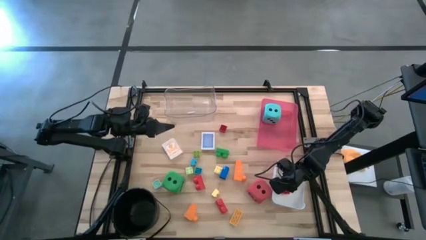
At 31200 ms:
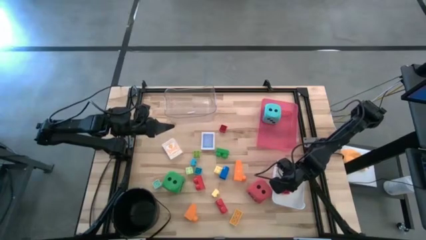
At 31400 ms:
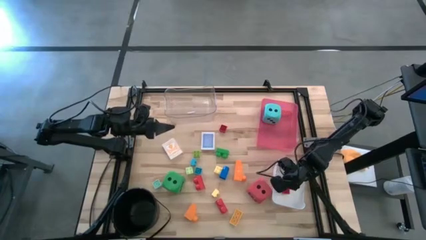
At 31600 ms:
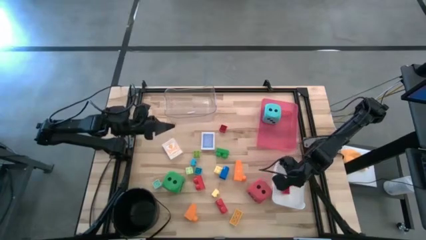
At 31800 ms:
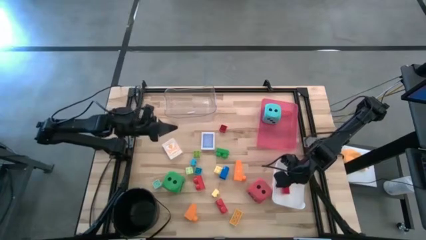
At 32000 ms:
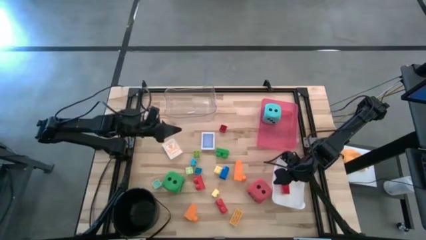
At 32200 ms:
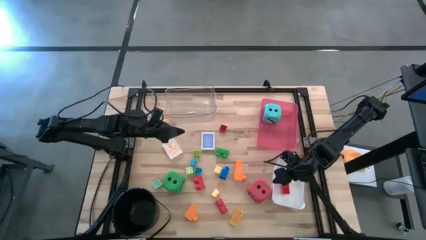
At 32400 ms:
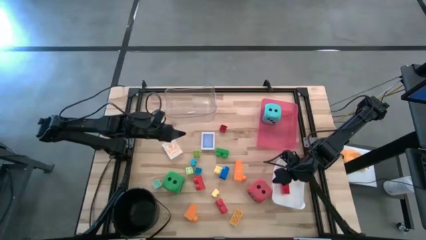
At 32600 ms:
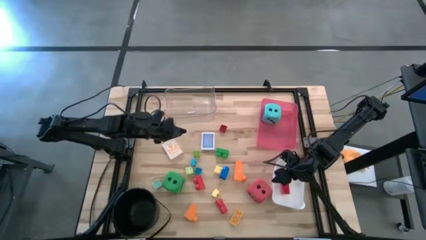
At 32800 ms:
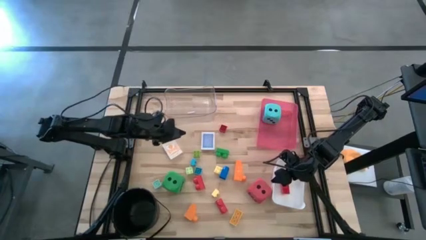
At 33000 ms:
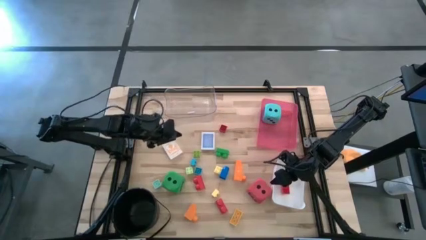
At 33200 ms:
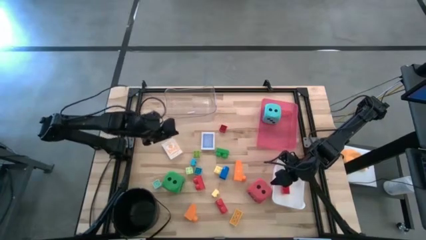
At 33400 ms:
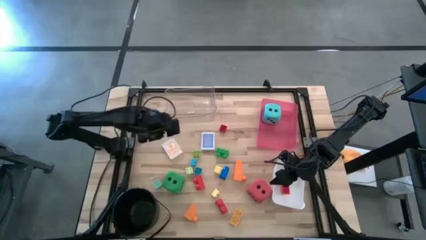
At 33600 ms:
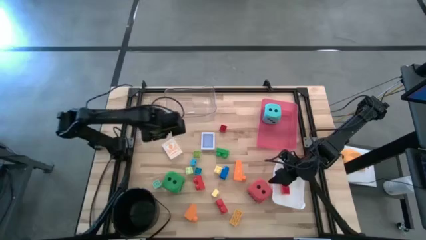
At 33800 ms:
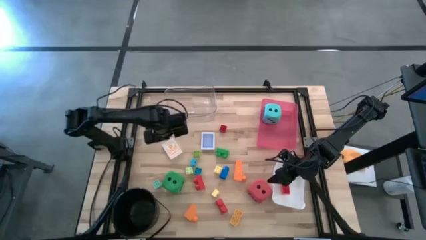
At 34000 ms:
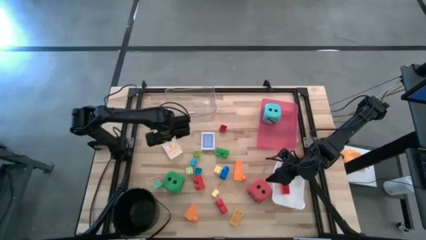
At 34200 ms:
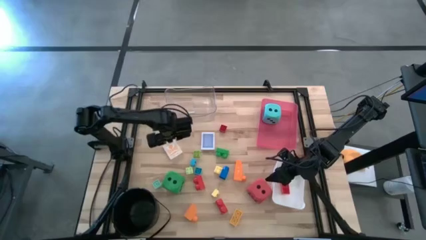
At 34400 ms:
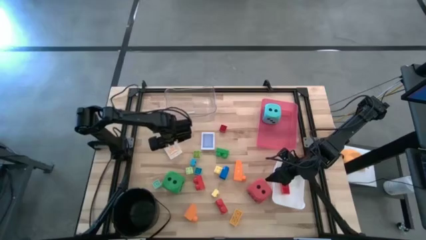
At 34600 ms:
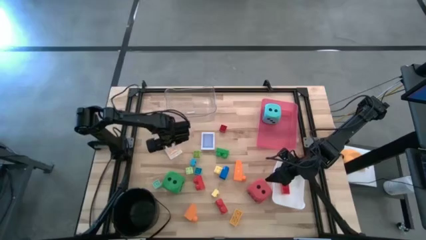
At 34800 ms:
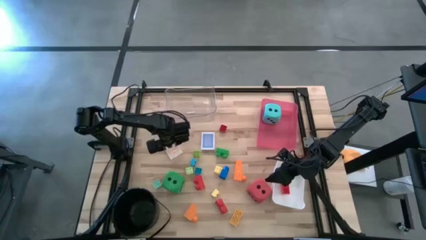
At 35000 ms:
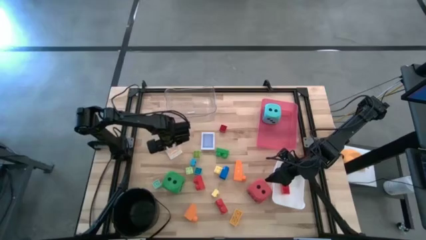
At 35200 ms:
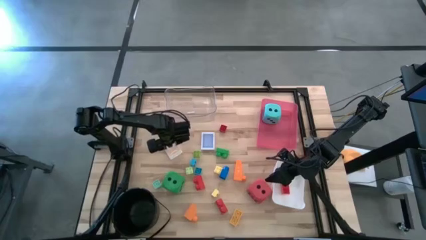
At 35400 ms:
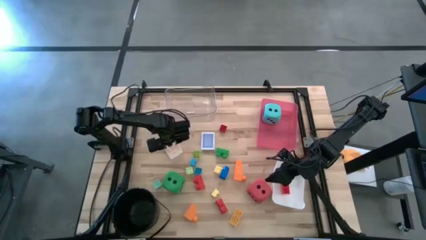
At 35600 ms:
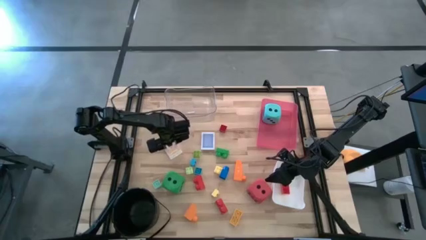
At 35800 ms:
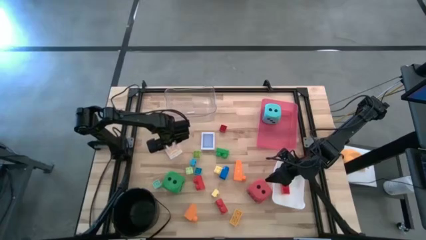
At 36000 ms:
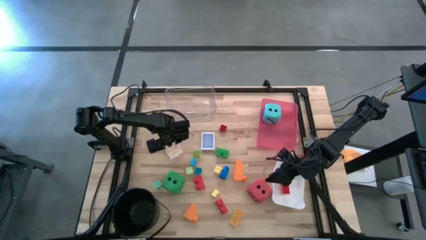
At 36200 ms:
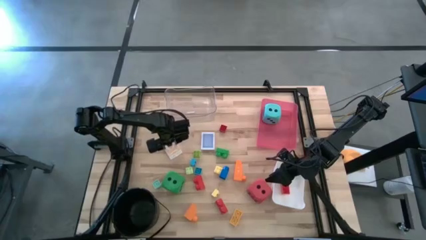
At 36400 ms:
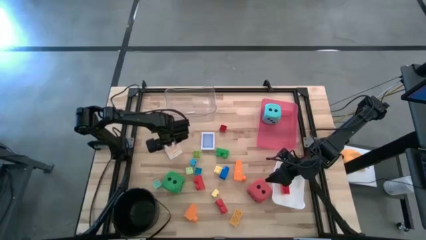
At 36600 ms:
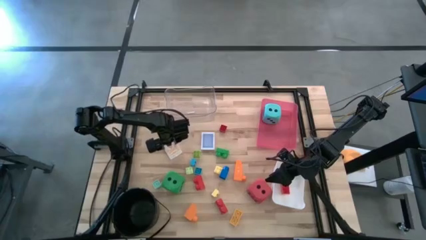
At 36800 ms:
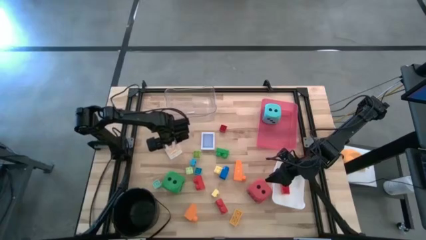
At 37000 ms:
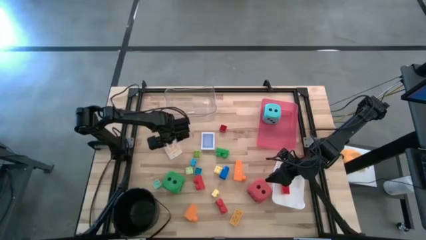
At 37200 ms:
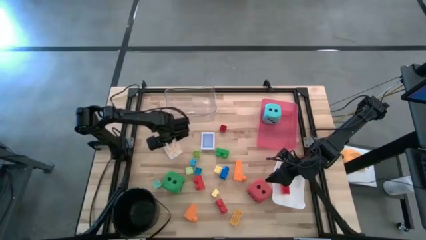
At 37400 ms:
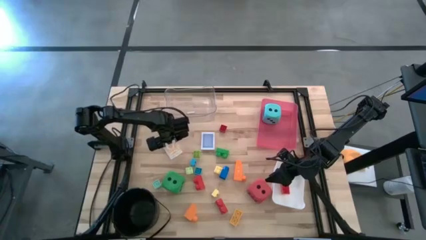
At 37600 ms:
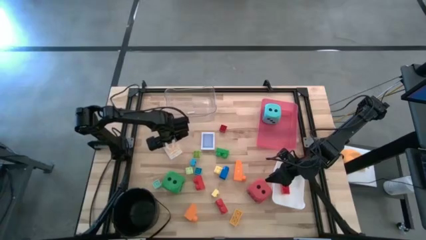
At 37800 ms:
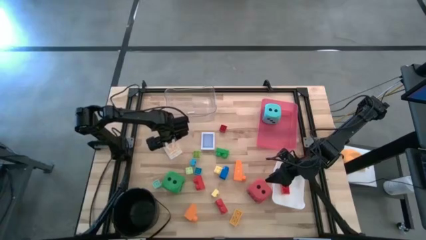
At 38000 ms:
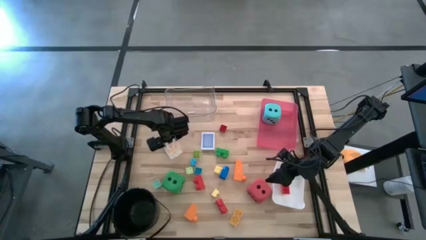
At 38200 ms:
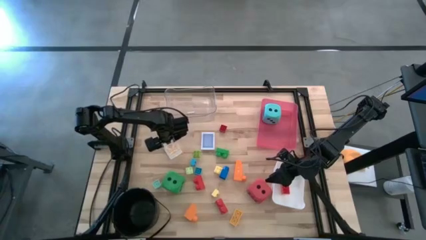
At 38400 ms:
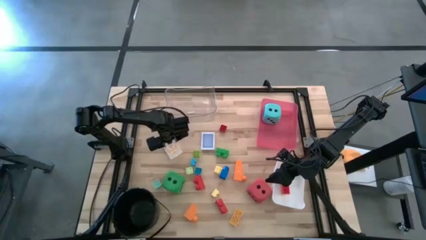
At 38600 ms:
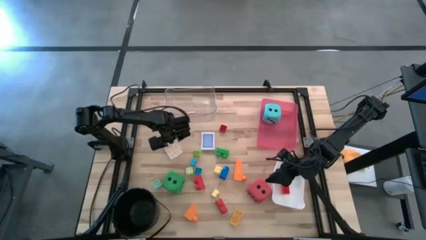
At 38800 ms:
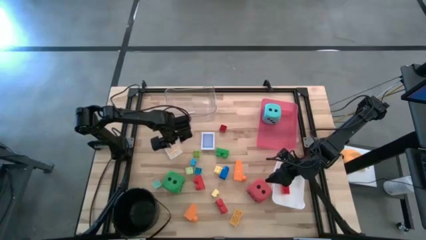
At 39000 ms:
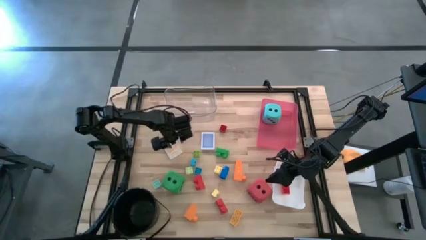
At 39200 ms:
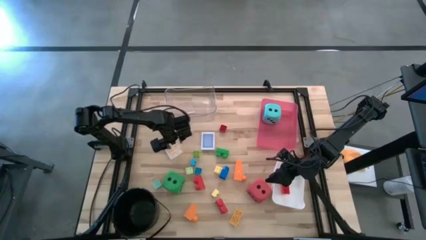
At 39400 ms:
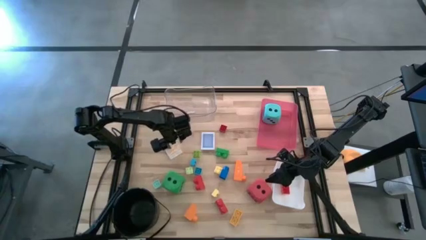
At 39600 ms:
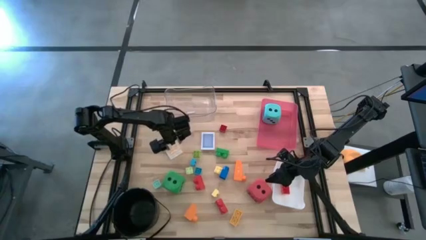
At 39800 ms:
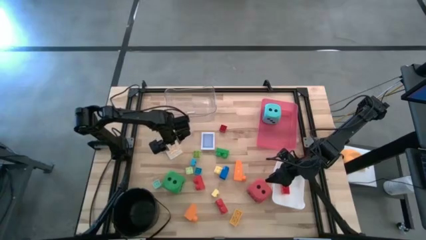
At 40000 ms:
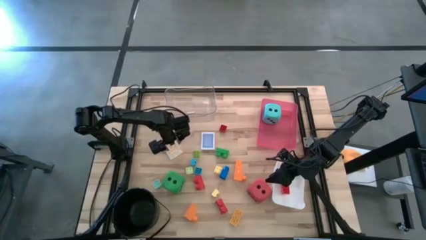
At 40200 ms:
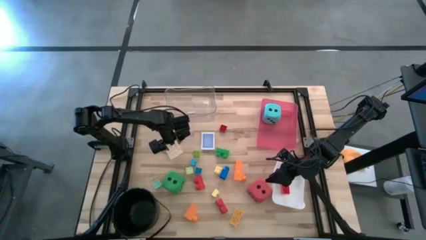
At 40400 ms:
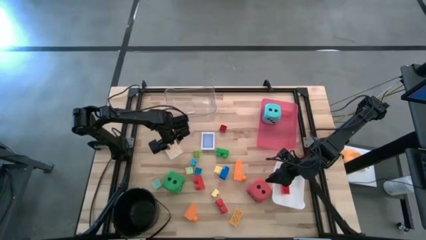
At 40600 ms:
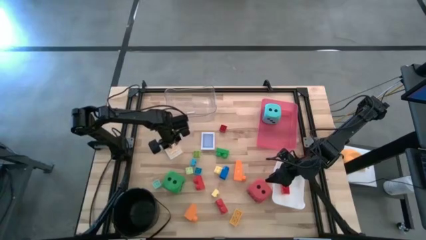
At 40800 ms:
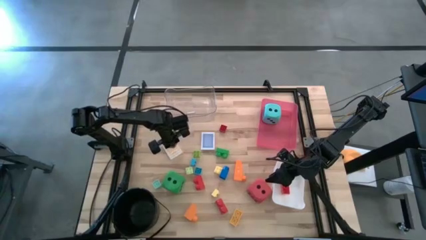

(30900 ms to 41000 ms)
Task: Pick & Place Toys
Put the orange deck of cards box into the transparent bin
